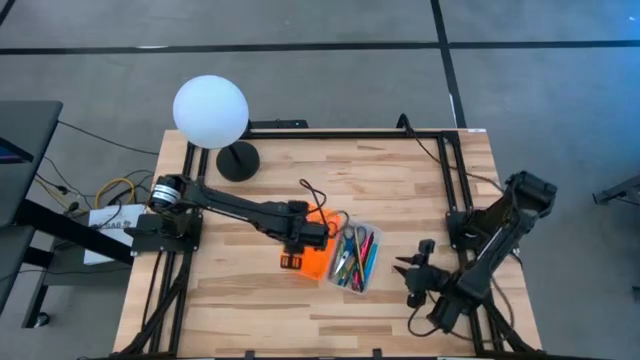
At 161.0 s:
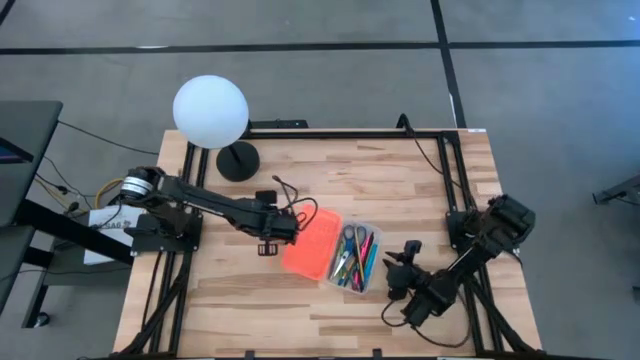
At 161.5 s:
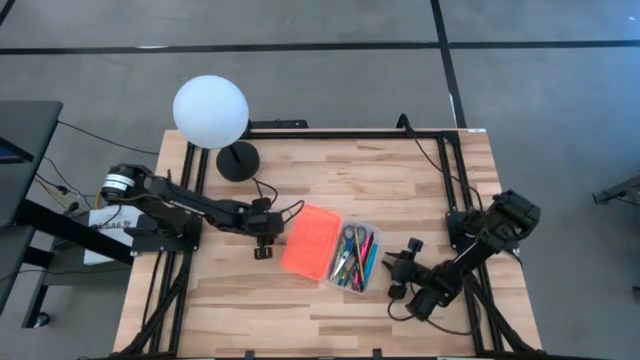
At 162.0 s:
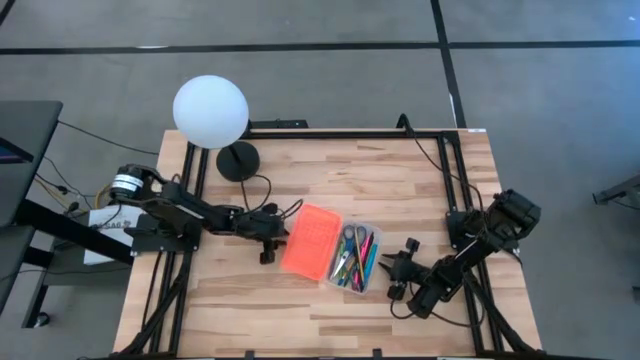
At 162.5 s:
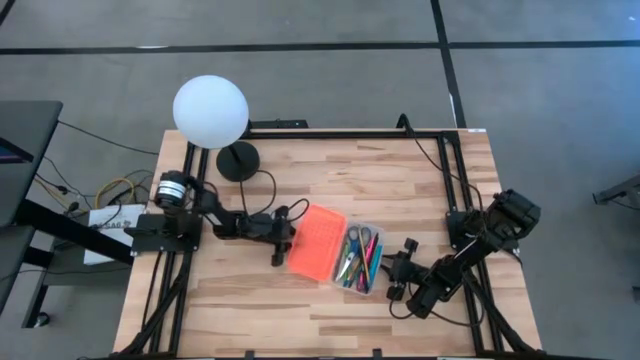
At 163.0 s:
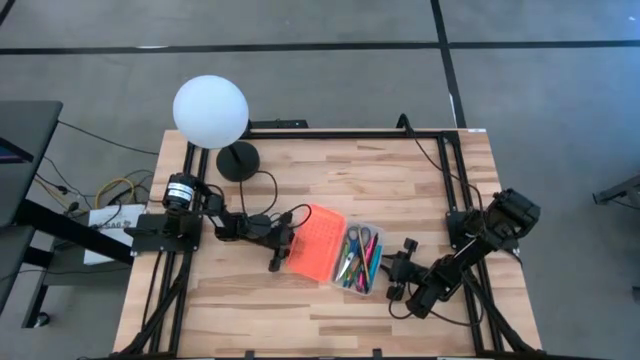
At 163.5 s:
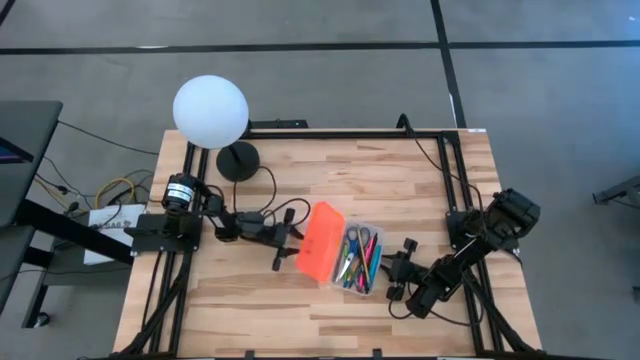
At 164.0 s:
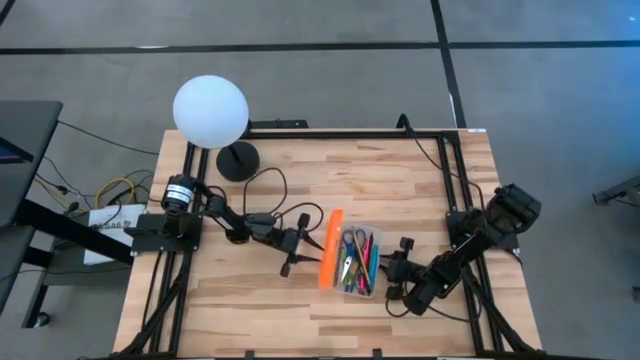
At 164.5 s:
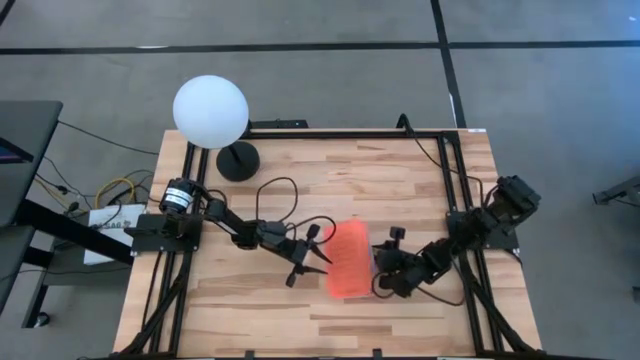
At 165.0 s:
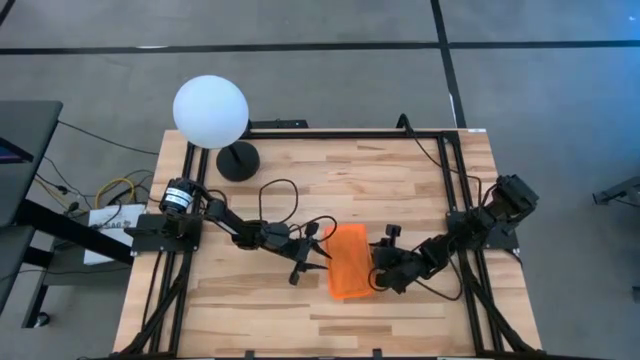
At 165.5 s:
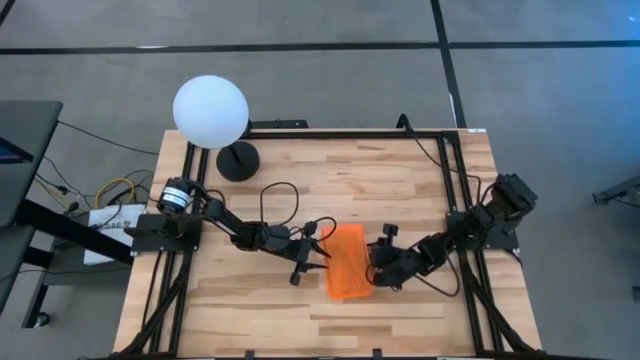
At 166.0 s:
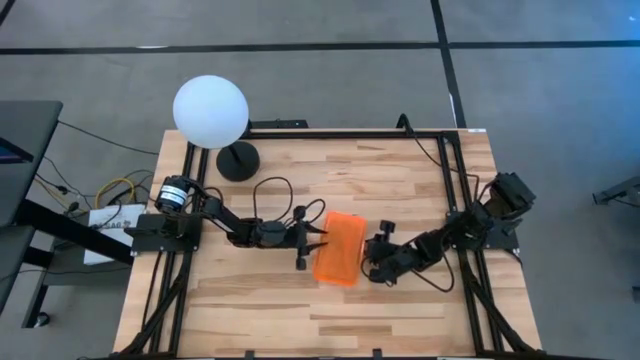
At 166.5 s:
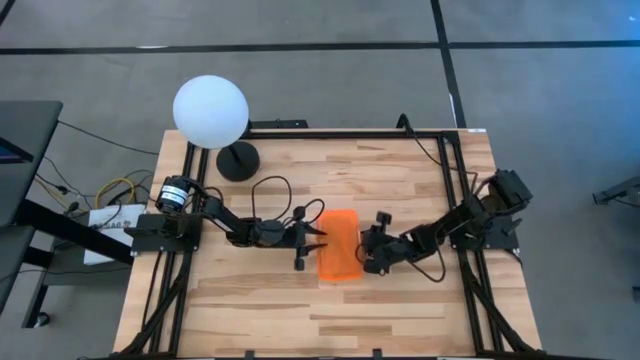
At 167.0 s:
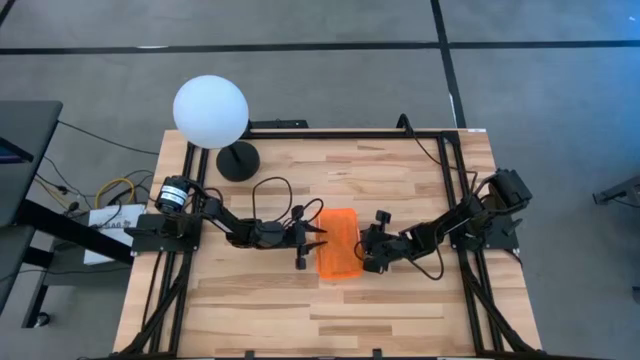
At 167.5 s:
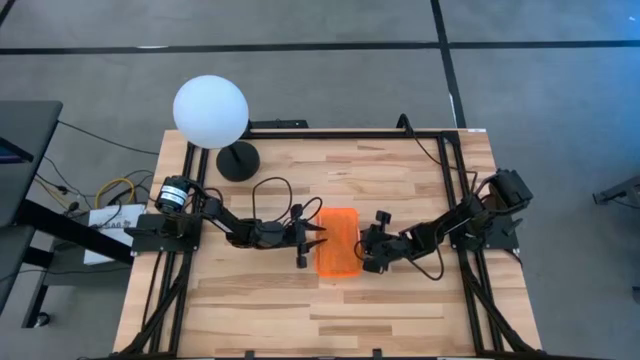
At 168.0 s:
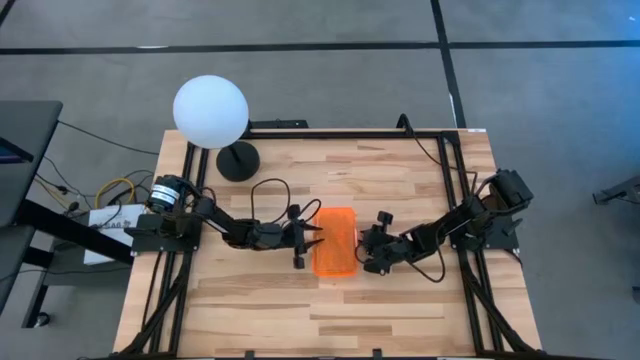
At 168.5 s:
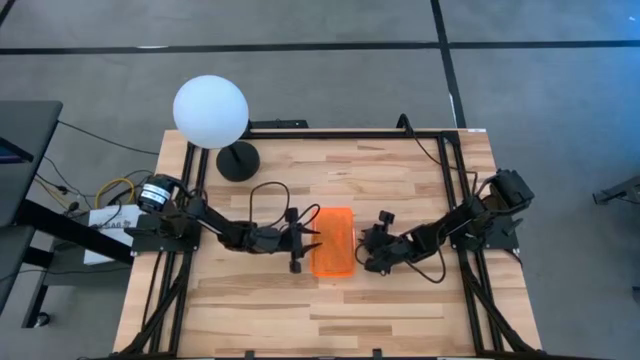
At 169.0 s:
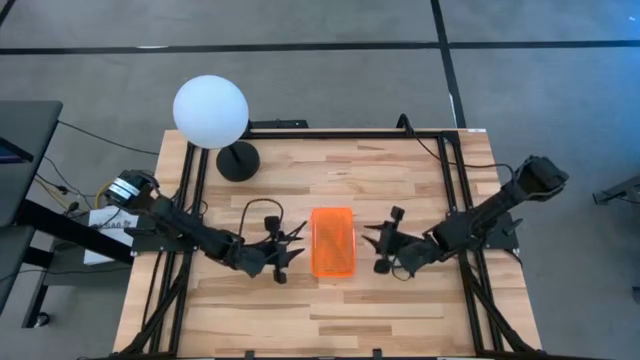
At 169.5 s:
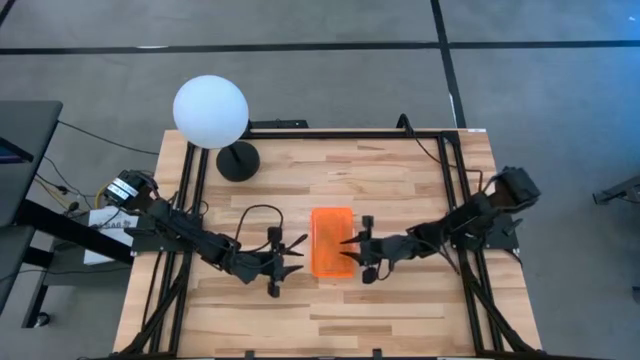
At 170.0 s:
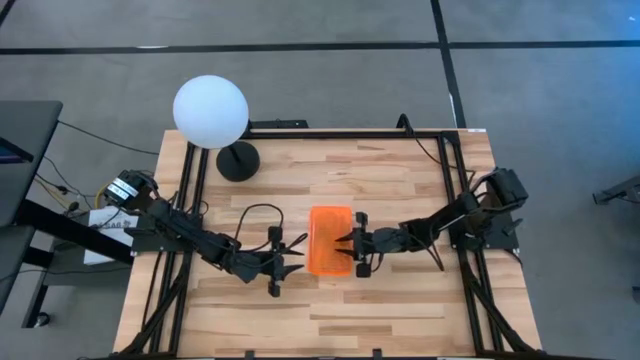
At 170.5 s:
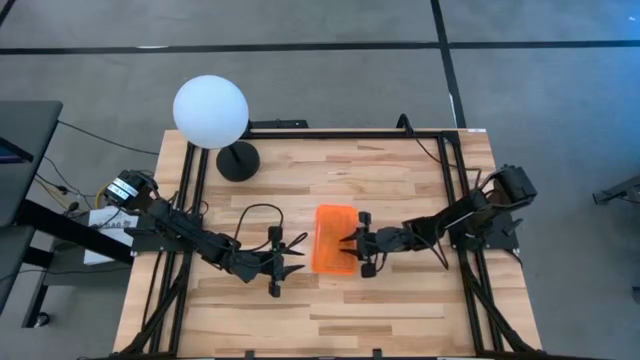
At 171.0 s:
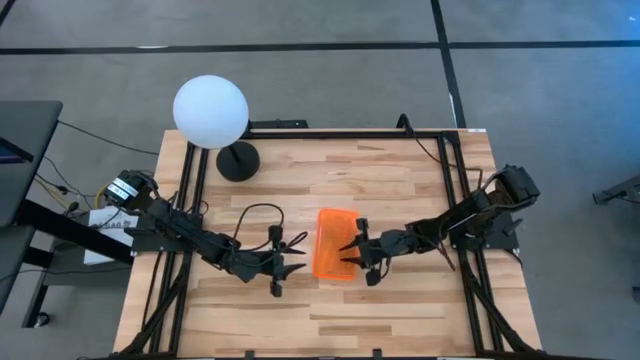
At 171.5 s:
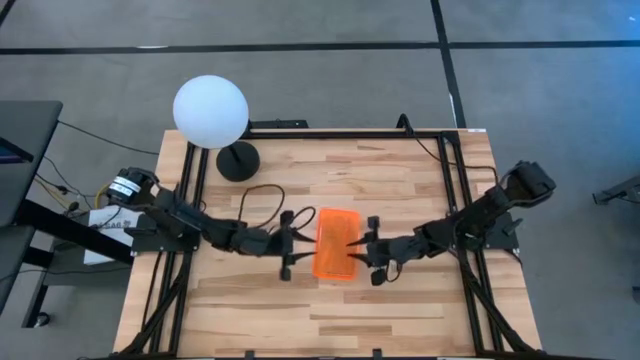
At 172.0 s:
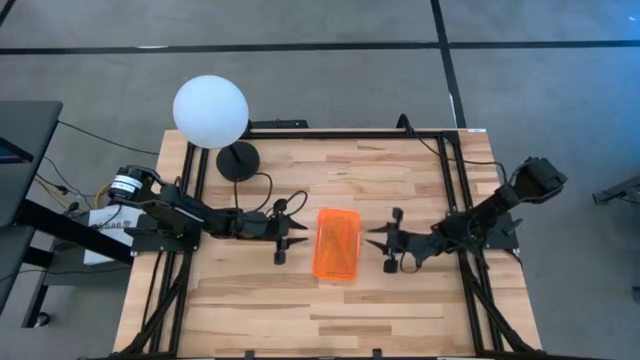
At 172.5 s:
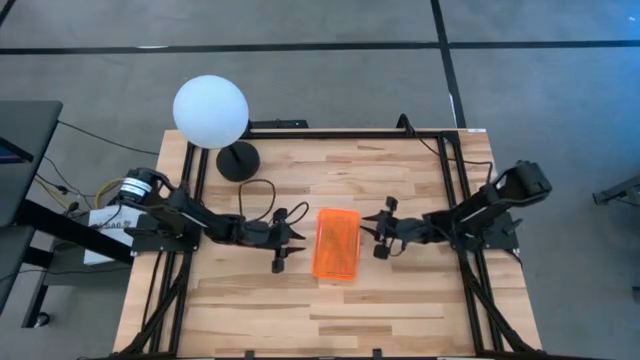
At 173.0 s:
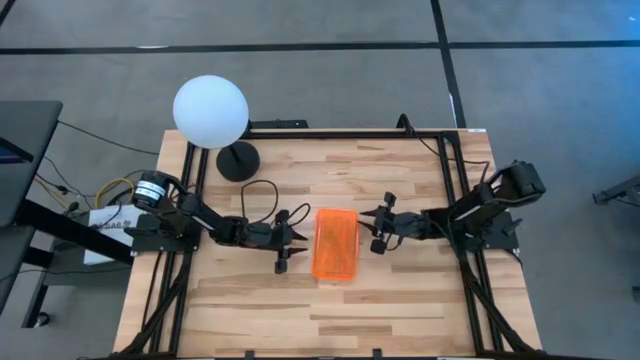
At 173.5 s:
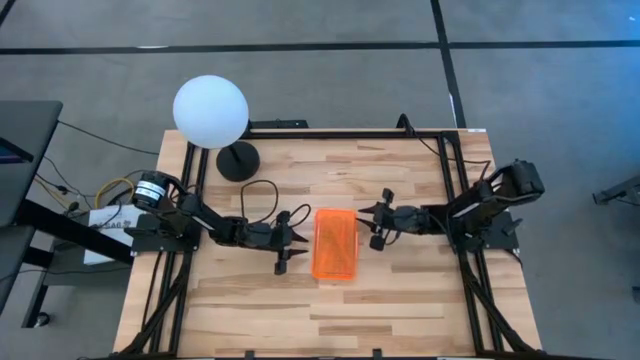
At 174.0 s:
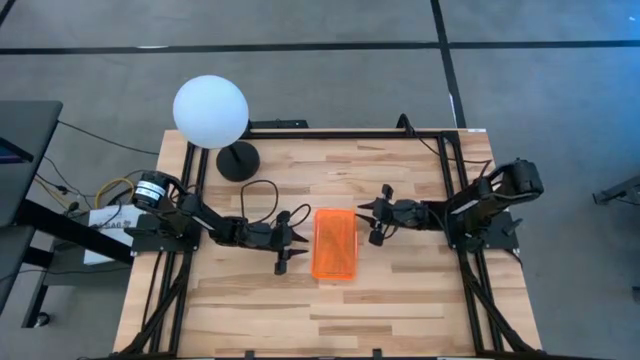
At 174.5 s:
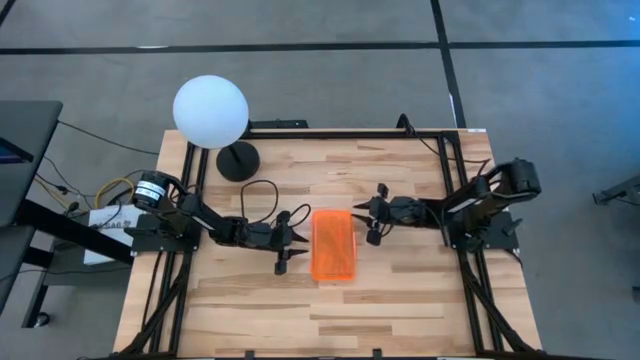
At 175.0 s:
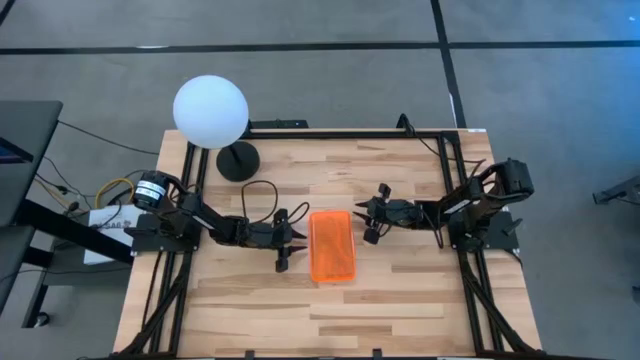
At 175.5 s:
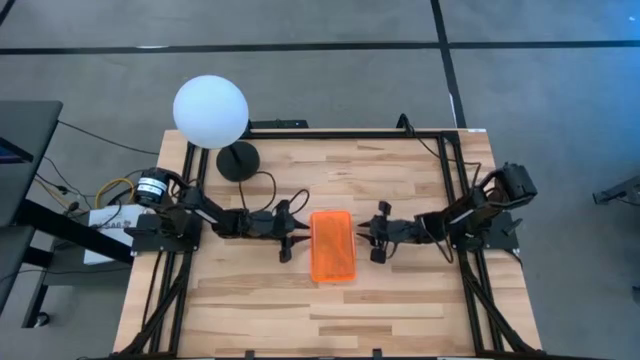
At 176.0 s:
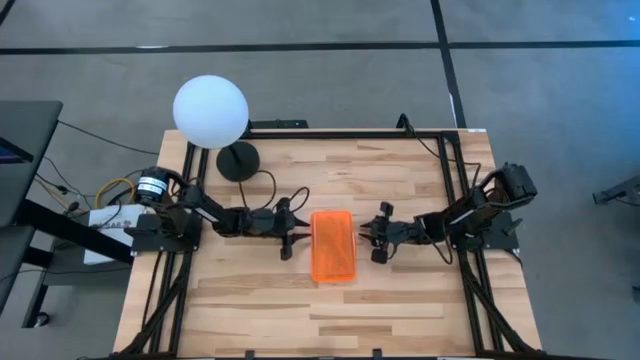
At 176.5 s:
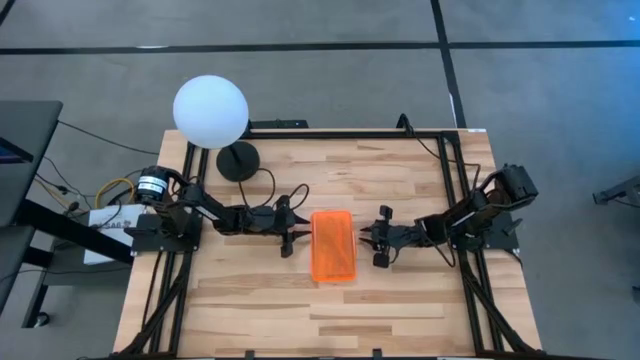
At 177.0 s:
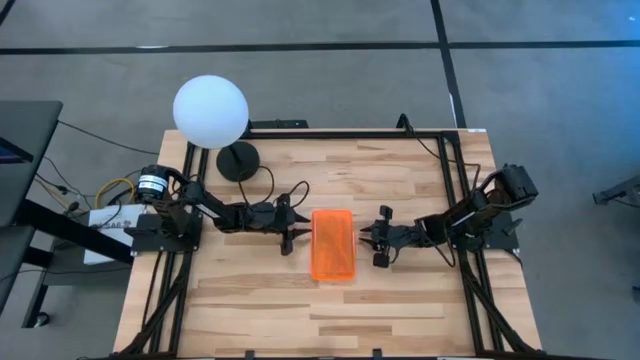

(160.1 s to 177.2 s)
Task: Pick & place school supplies into a supply box
Close the orange supply box

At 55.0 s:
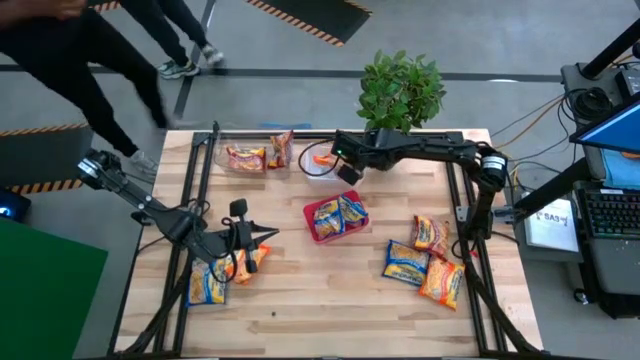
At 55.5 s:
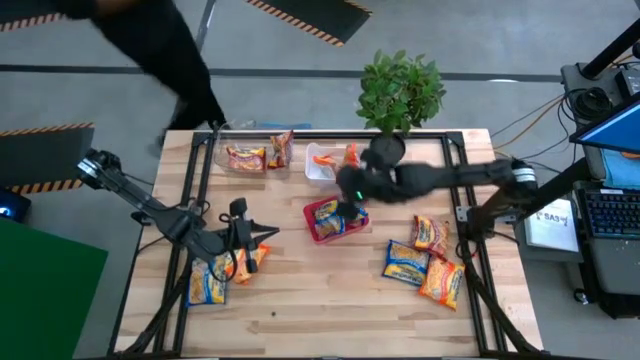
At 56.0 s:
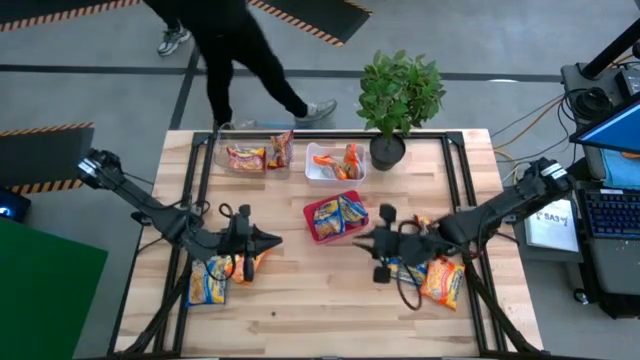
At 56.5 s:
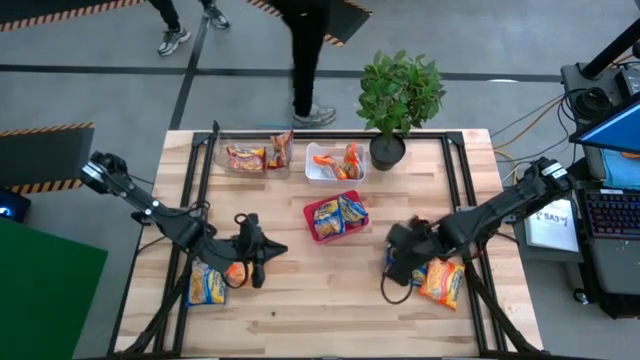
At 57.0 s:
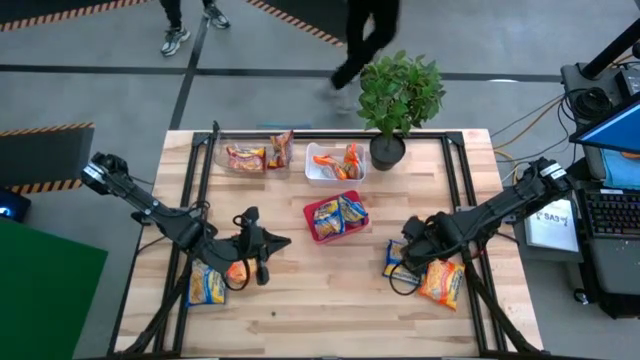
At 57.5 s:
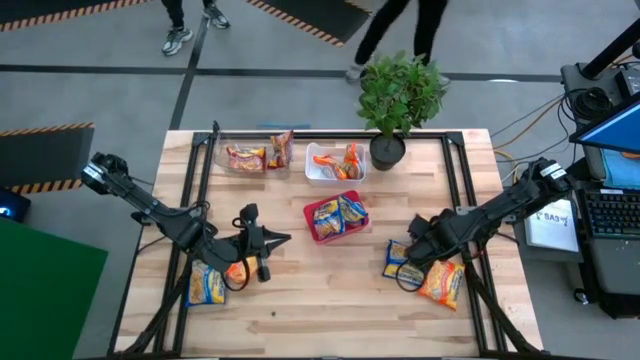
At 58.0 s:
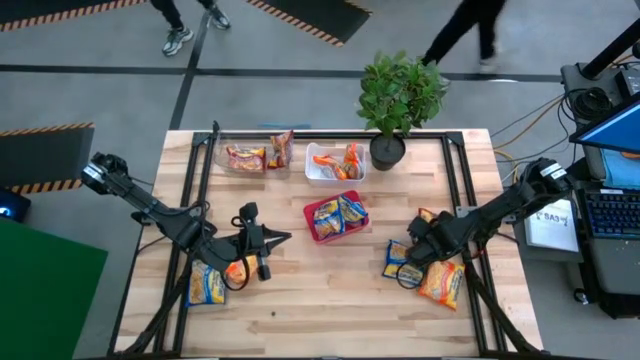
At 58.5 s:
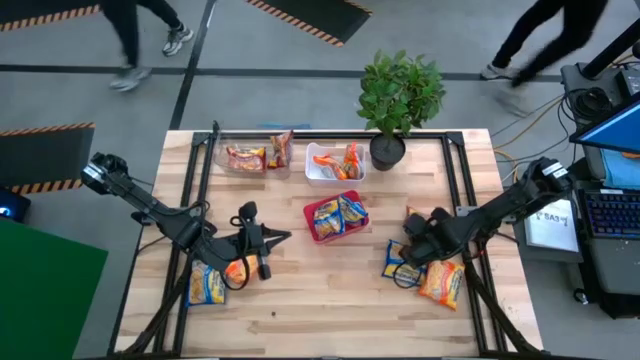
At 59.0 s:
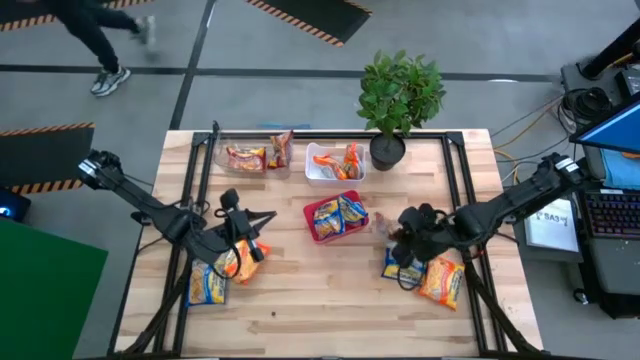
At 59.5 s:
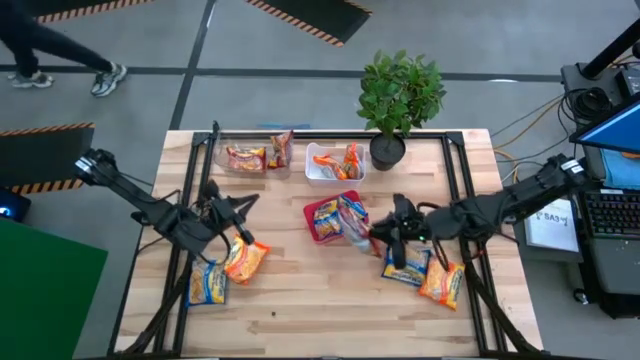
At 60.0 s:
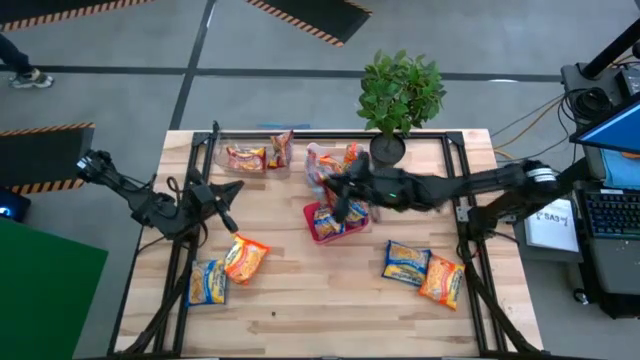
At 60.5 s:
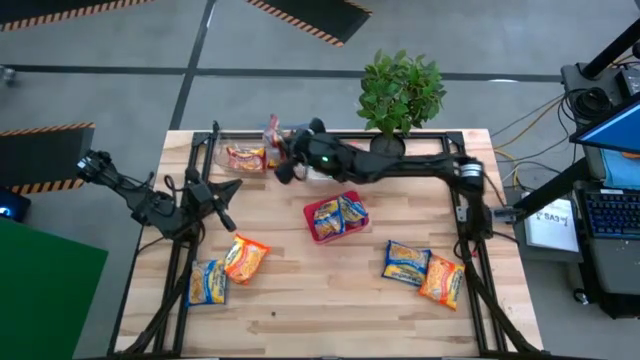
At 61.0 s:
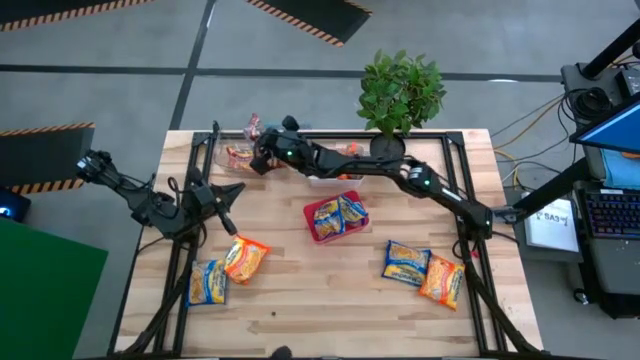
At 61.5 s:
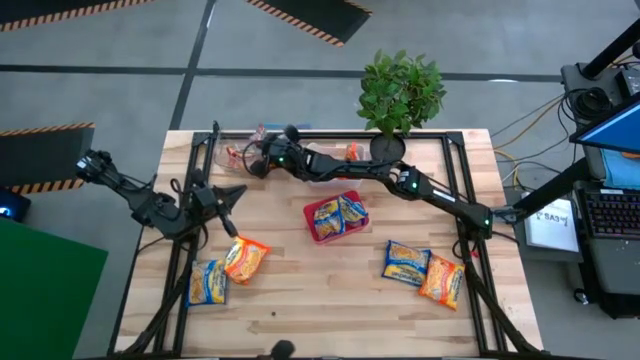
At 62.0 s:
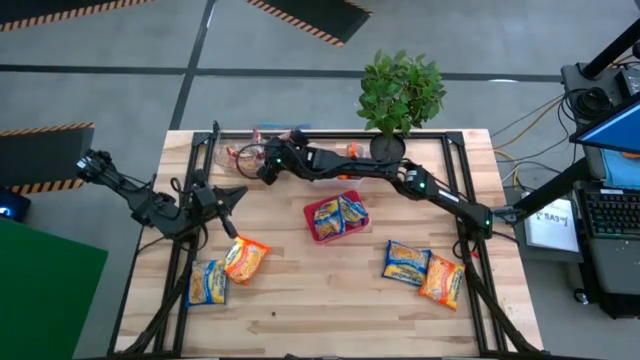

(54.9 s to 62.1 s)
Task: Sort Maruchan noodles
Put the red noodle pack into the transparent bin
